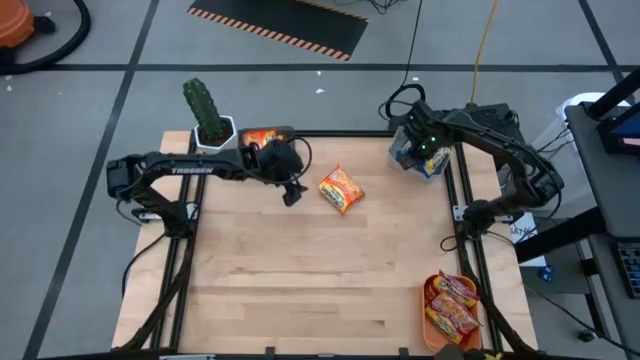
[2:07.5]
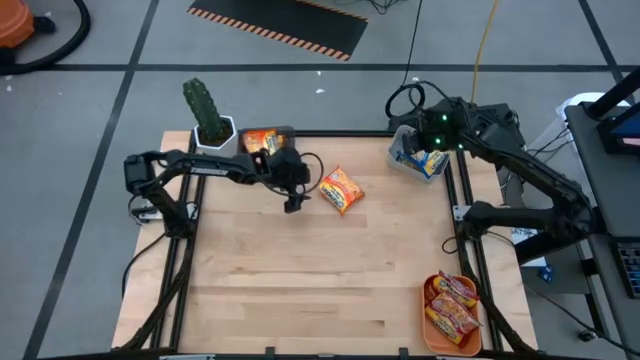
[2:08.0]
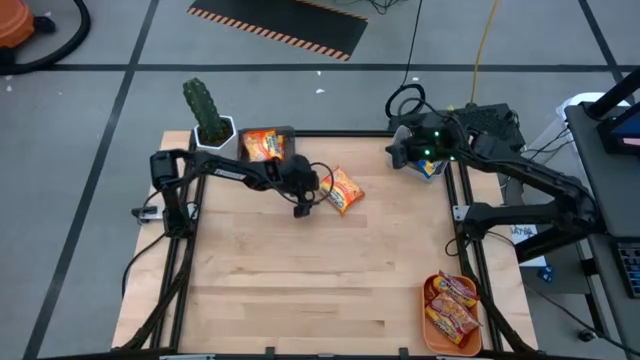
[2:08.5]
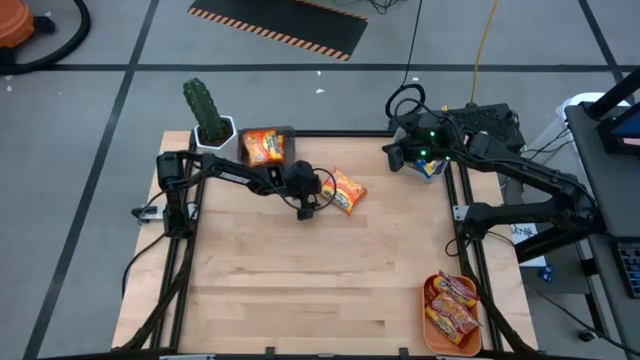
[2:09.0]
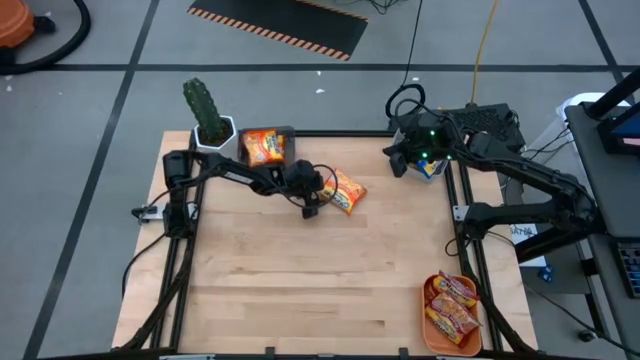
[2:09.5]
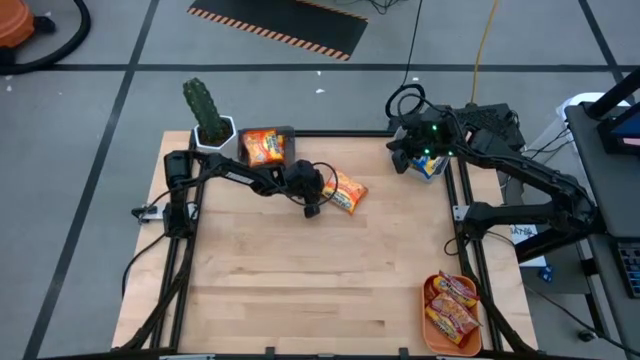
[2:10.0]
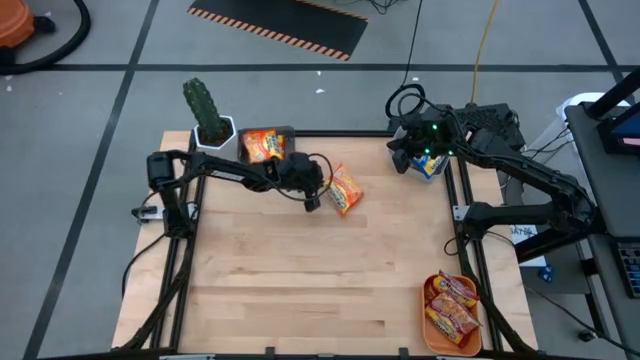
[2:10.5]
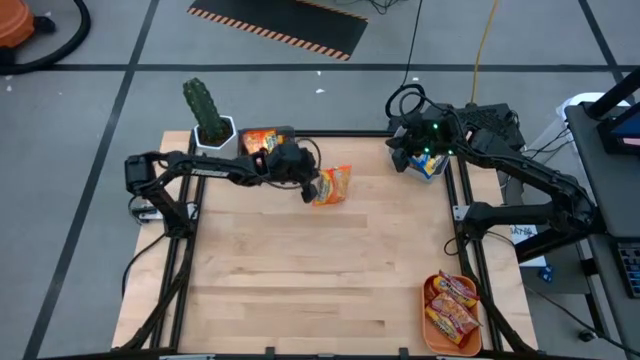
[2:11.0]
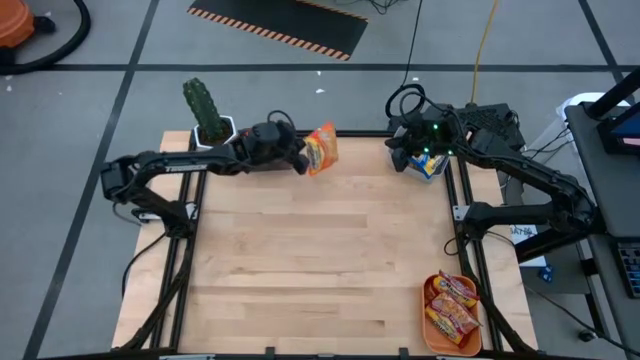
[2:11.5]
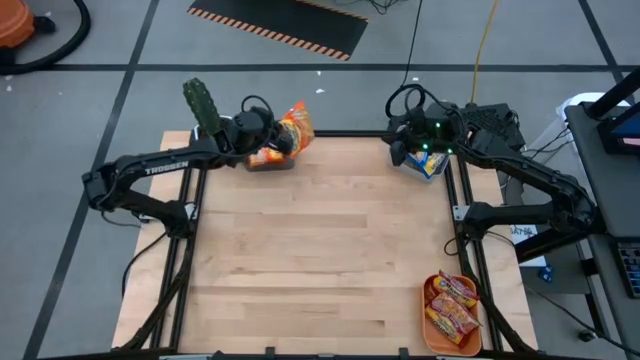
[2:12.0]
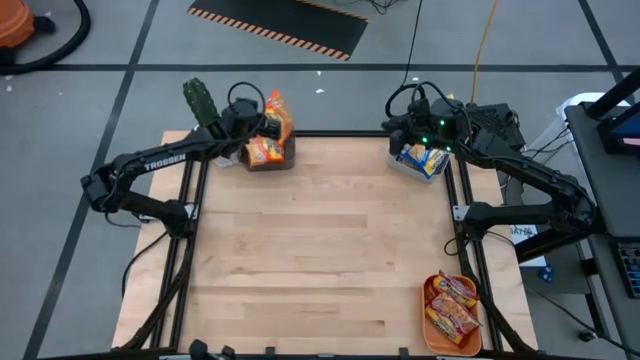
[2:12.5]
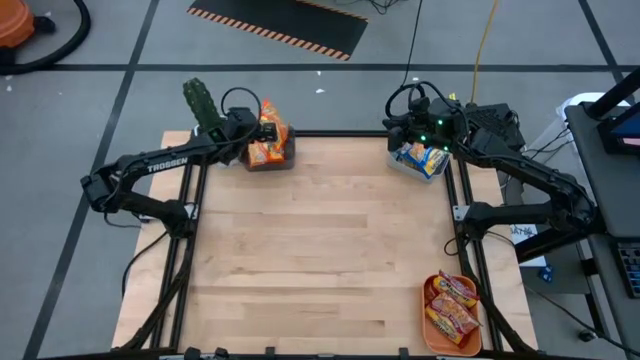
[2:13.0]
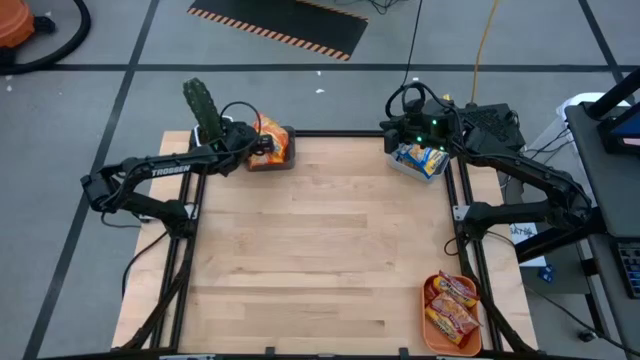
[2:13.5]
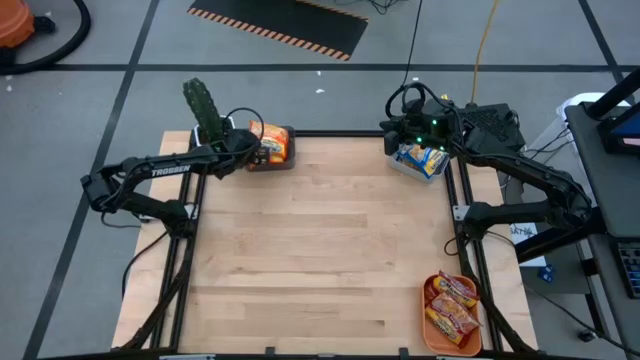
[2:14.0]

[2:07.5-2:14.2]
Task: Sort Maruchan noodles
Put the orange noodle pack into the black bin

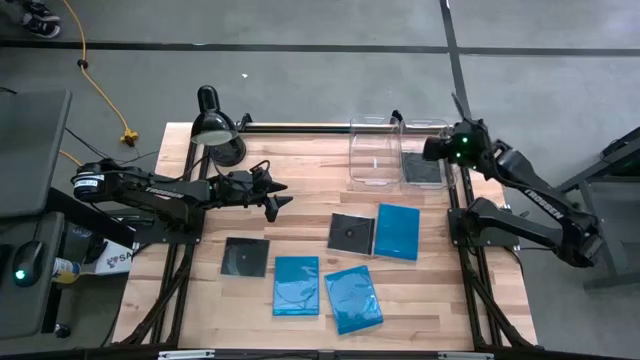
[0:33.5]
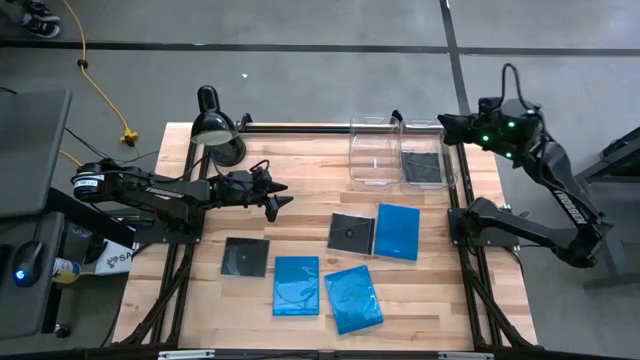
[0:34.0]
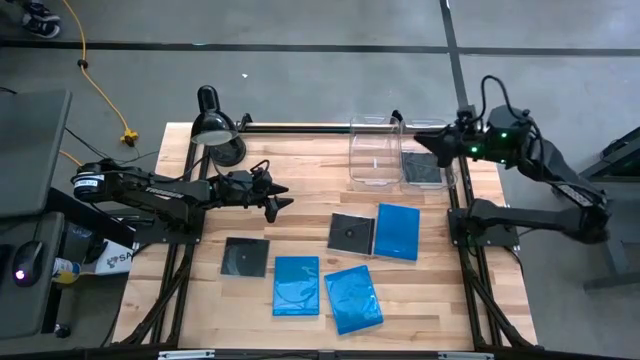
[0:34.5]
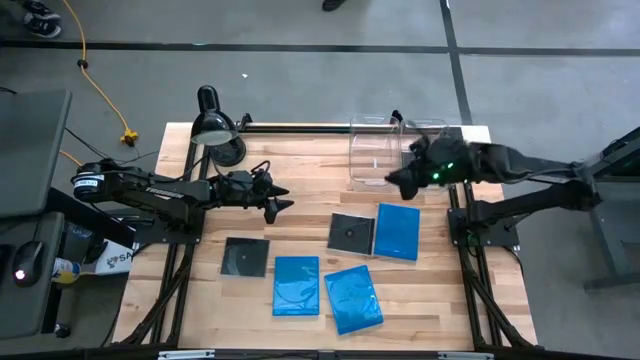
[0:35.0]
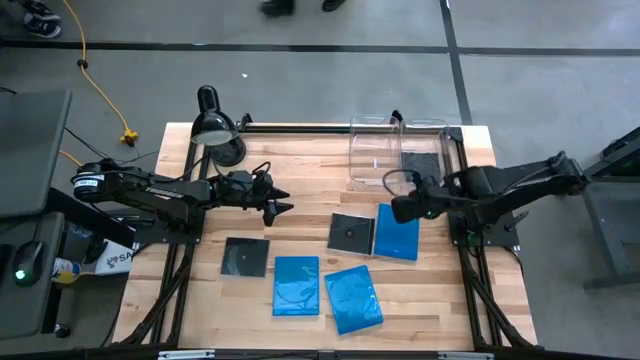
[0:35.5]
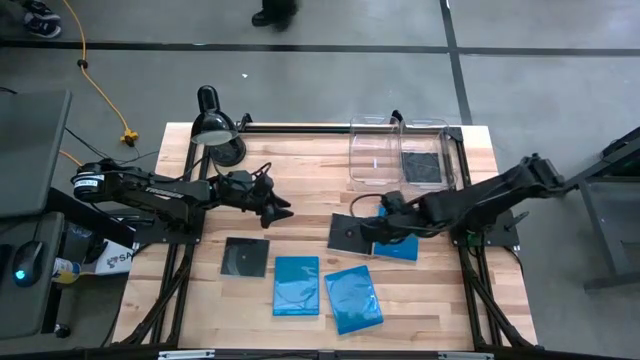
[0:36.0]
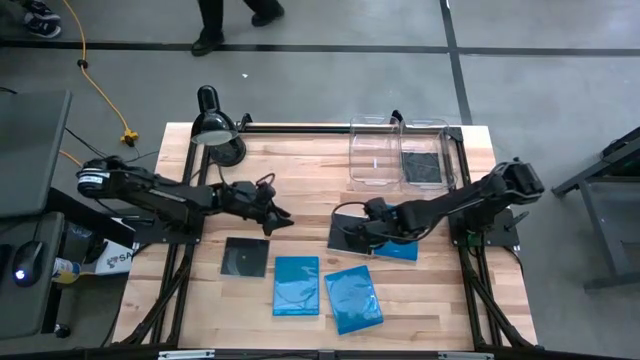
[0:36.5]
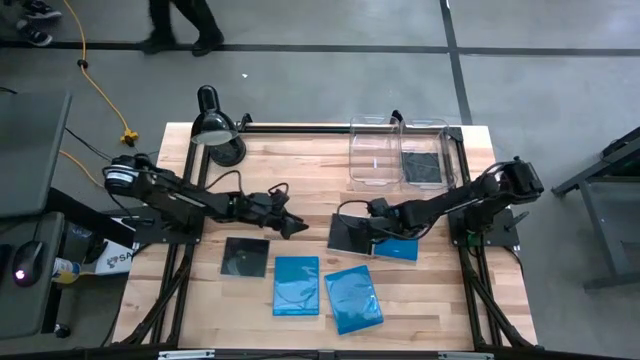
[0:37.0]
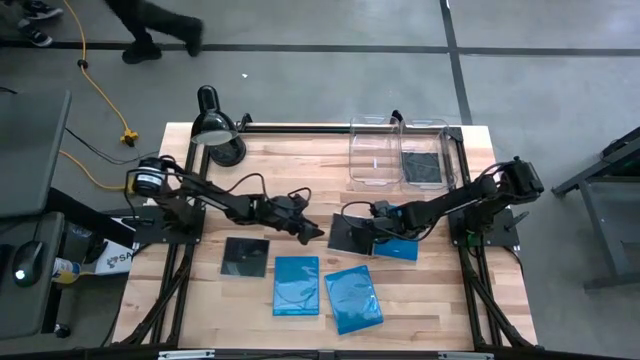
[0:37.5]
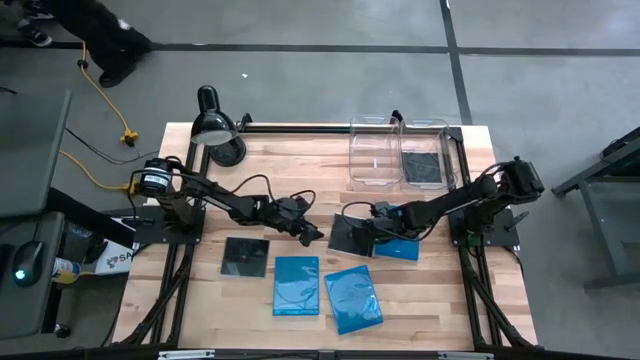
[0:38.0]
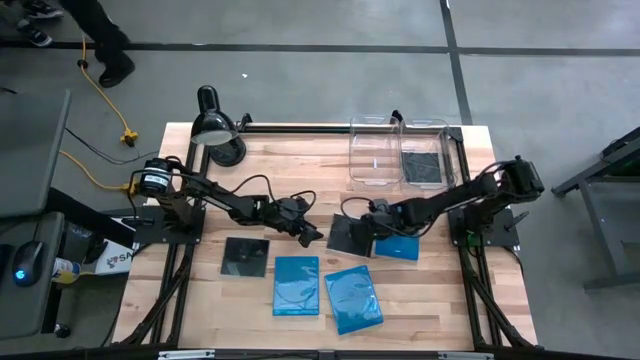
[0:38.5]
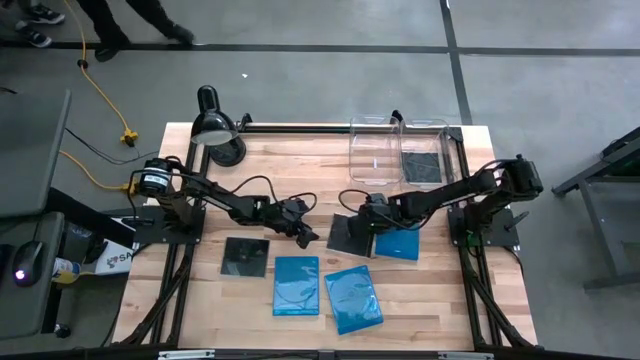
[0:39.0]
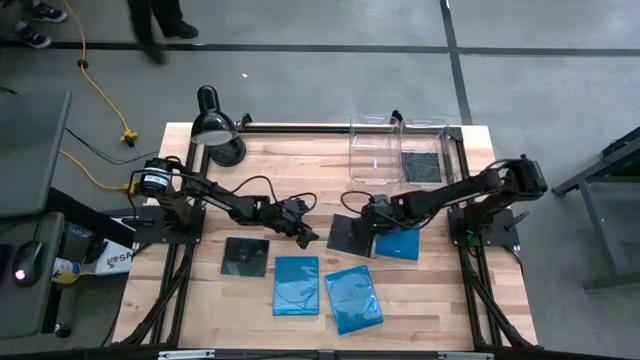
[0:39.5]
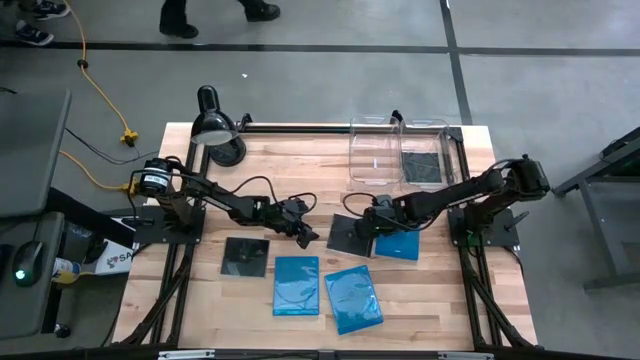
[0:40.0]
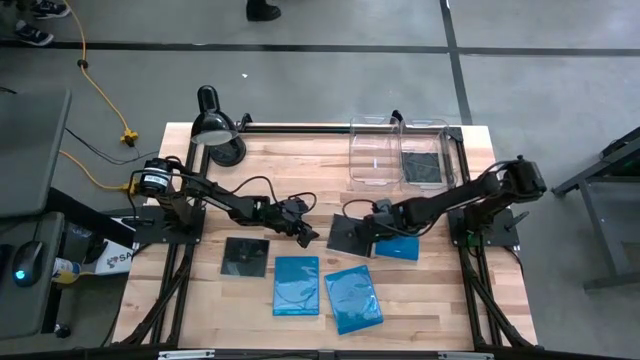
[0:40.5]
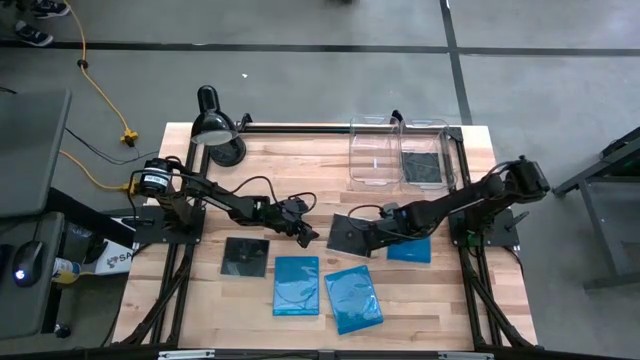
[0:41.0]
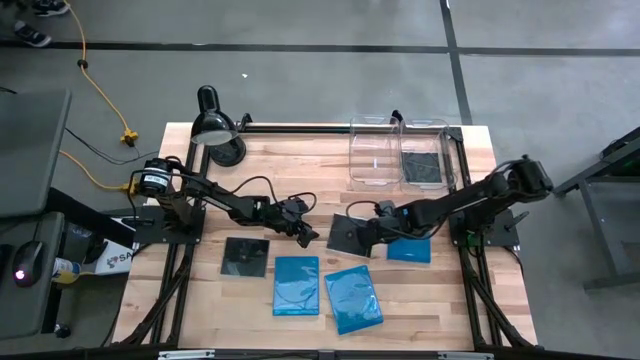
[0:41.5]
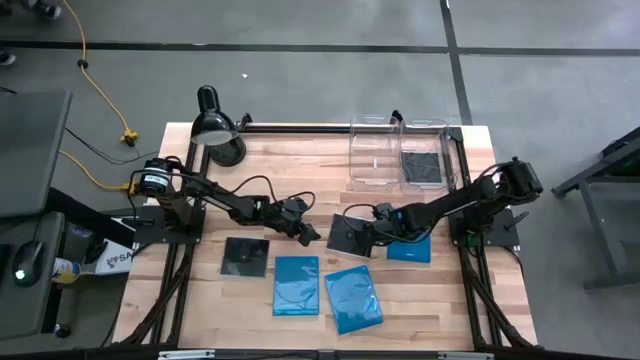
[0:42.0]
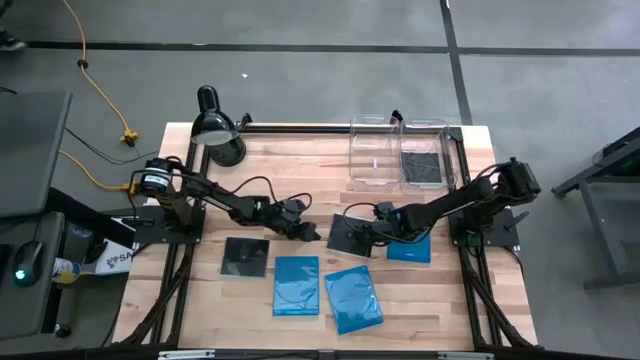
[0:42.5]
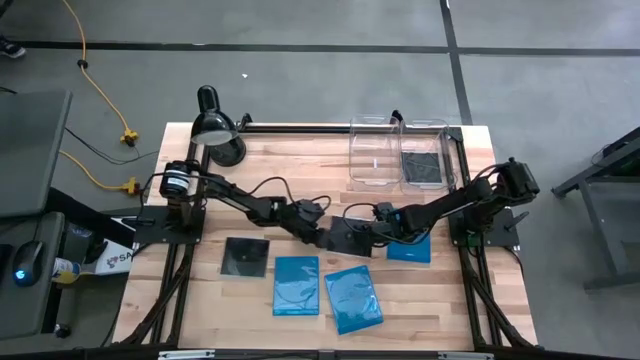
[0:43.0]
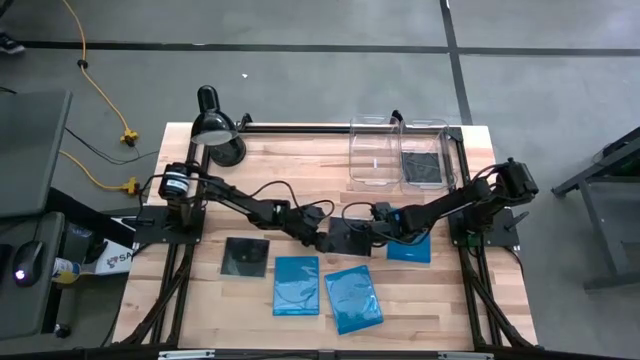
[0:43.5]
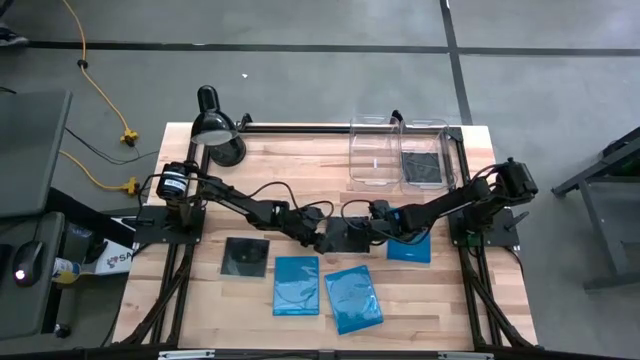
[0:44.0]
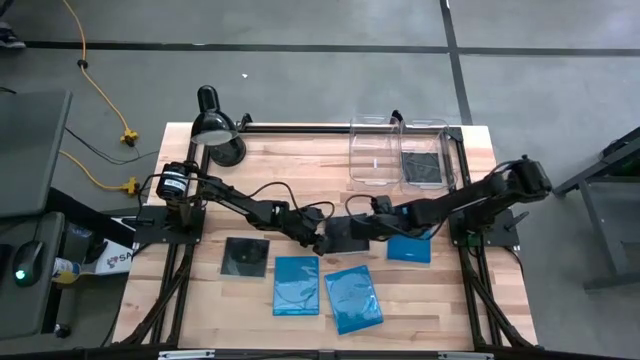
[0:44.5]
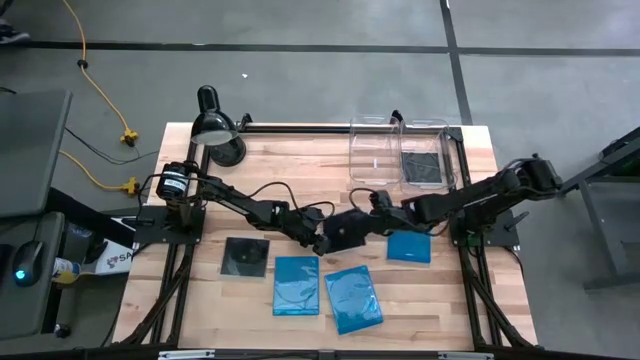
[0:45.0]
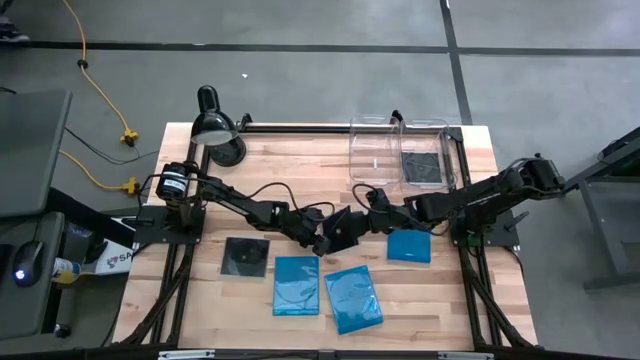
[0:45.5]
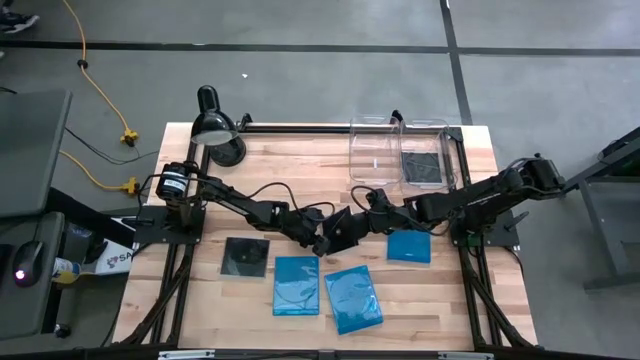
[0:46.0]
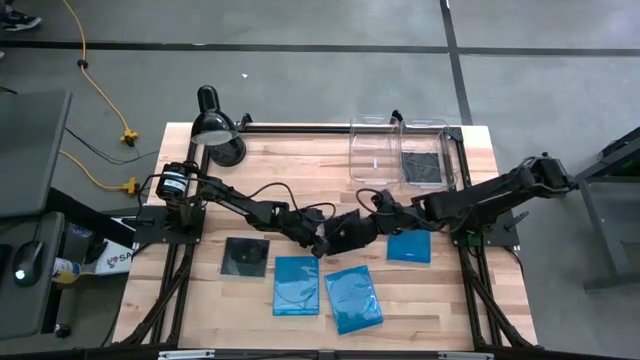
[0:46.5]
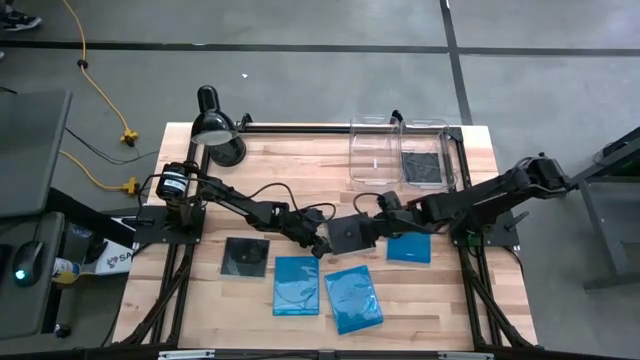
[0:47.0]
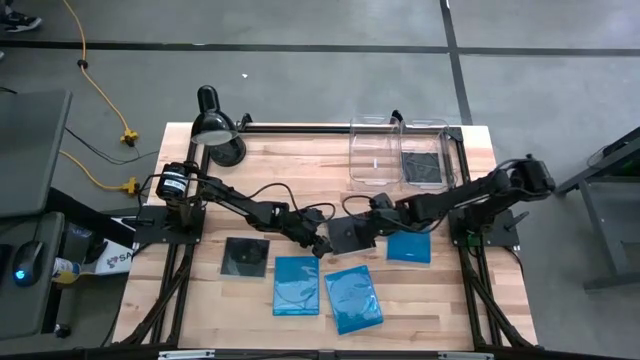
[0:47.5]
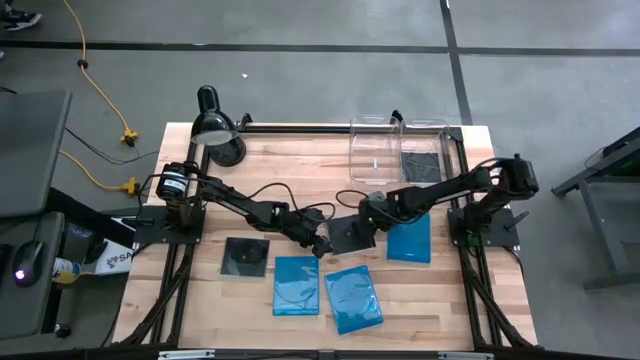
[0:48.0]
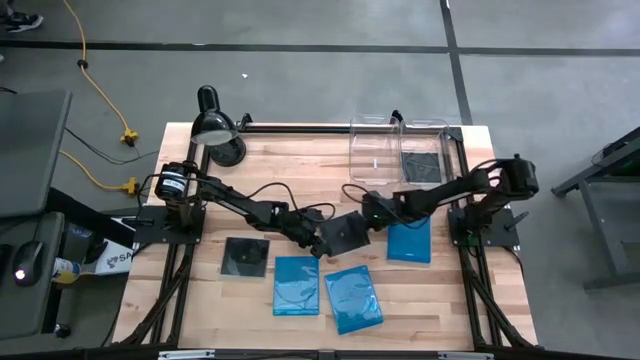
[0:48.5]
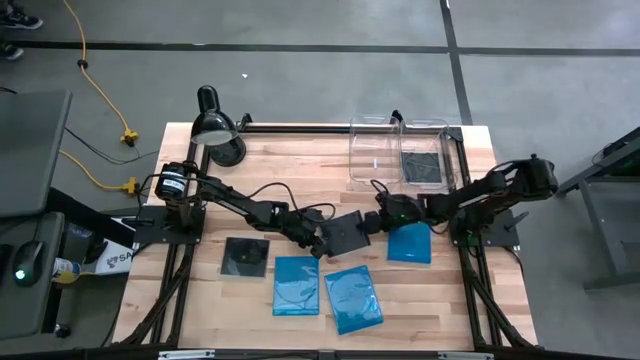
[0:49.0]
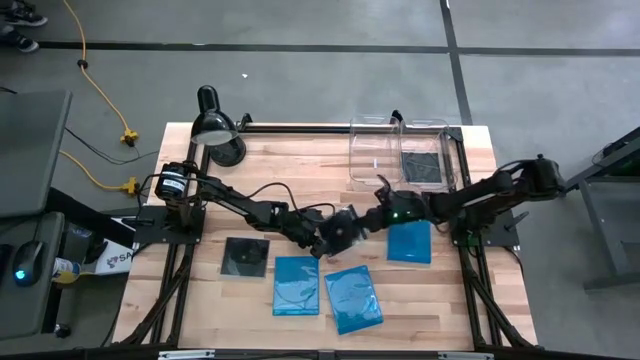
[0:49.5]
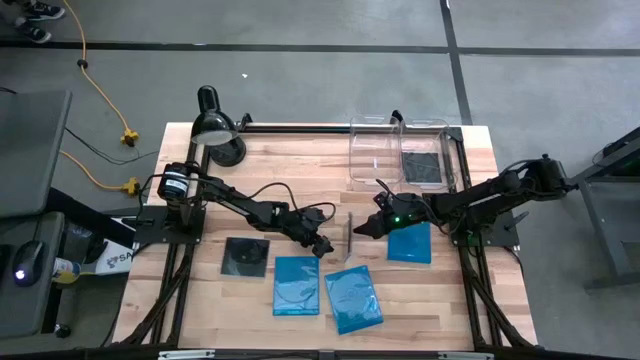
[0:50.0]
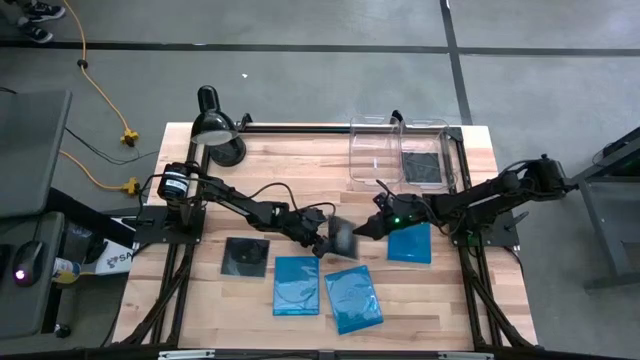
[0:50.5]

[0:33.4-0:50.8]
Task: Pick & place jewel cases by type
Put the right black CD case into the right transparent bin
